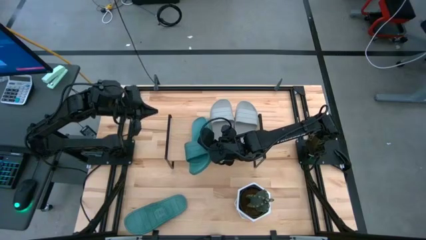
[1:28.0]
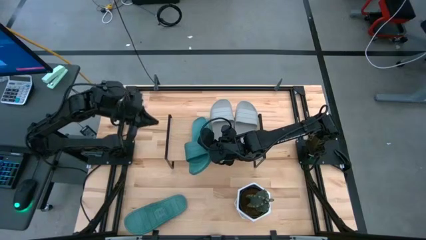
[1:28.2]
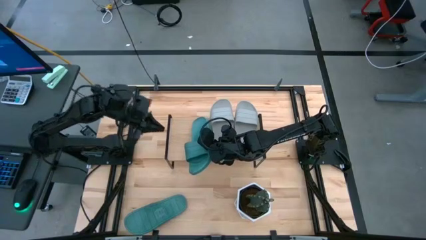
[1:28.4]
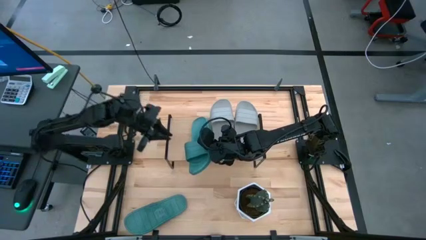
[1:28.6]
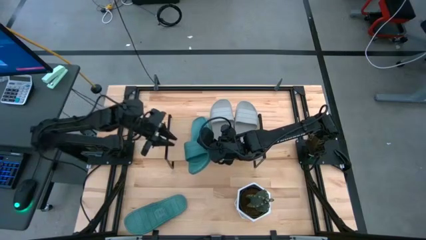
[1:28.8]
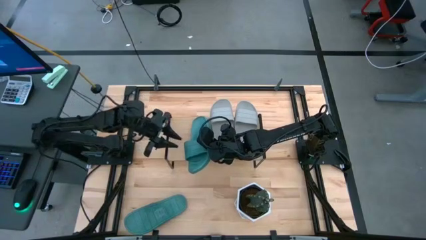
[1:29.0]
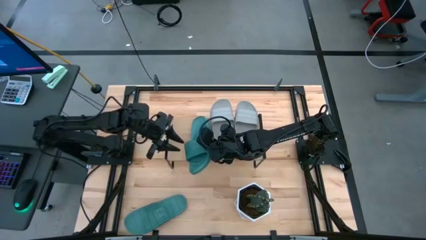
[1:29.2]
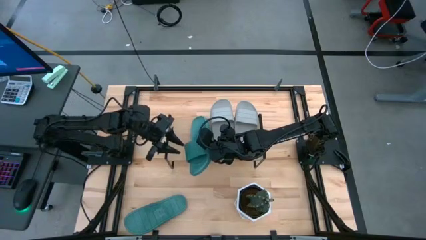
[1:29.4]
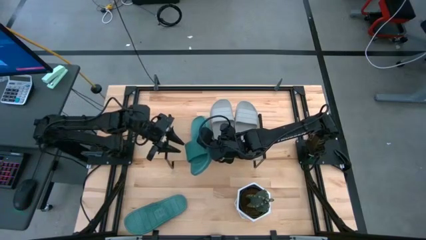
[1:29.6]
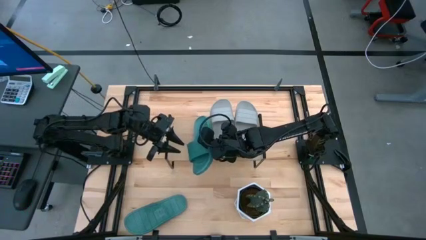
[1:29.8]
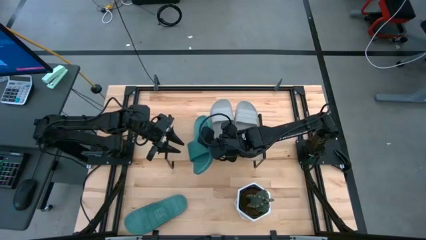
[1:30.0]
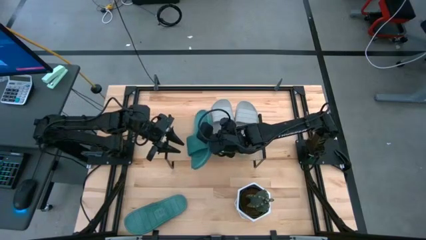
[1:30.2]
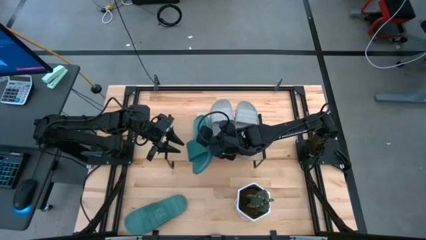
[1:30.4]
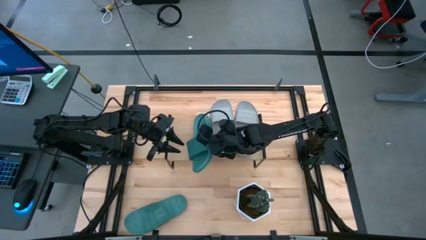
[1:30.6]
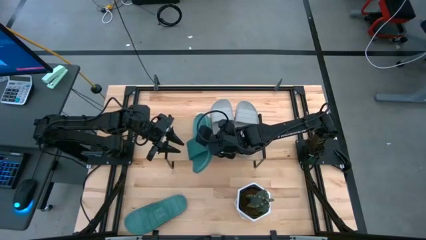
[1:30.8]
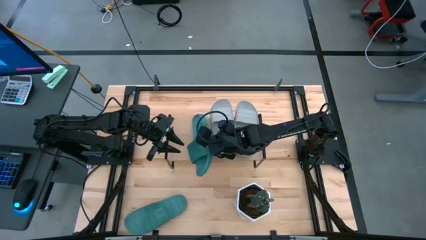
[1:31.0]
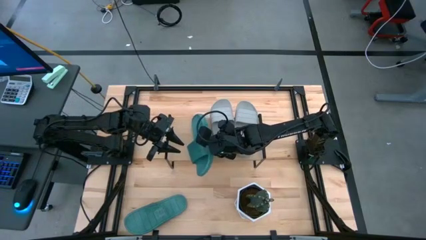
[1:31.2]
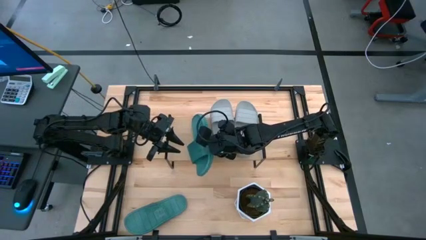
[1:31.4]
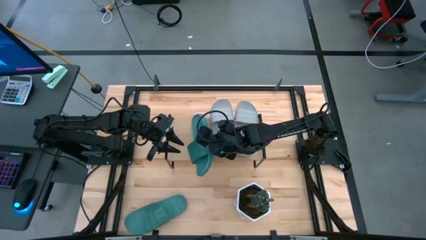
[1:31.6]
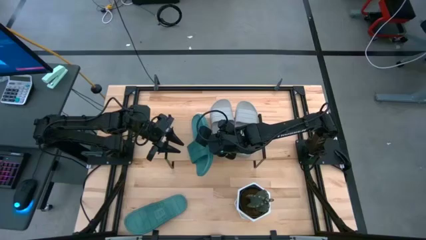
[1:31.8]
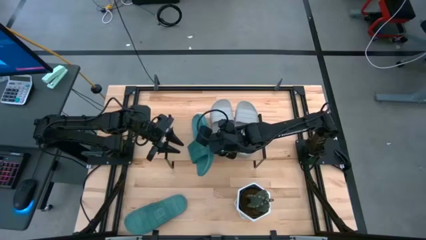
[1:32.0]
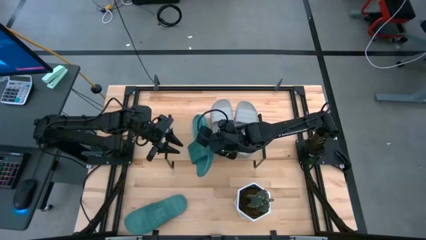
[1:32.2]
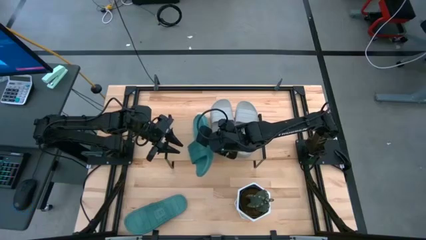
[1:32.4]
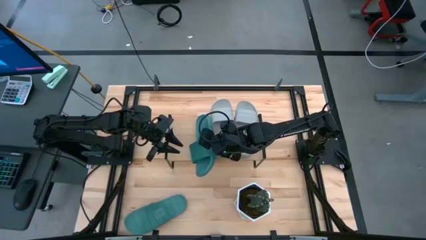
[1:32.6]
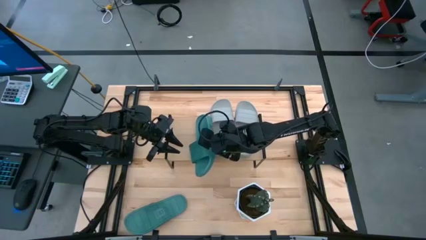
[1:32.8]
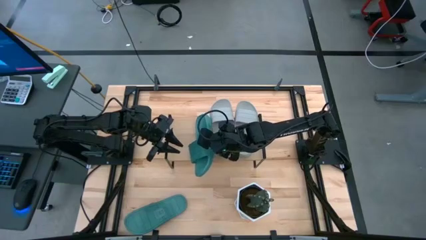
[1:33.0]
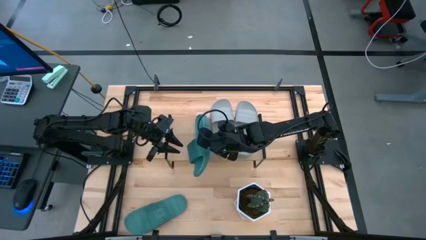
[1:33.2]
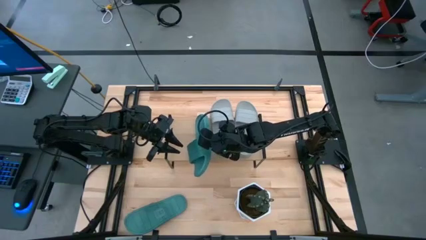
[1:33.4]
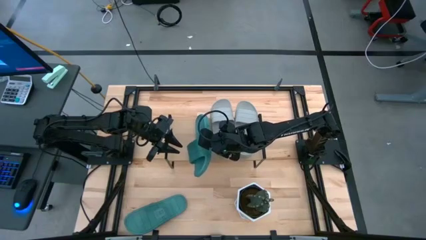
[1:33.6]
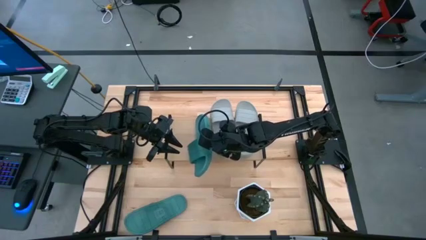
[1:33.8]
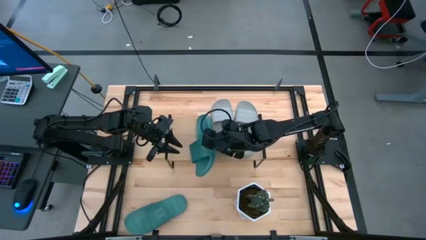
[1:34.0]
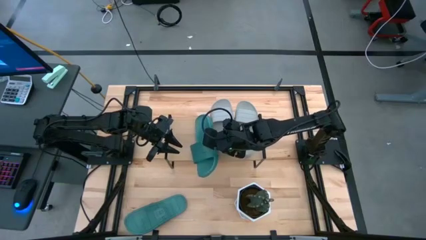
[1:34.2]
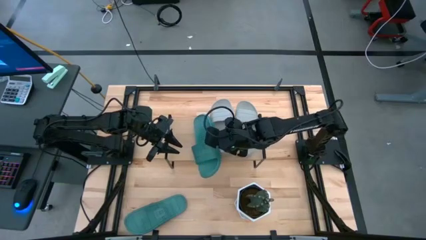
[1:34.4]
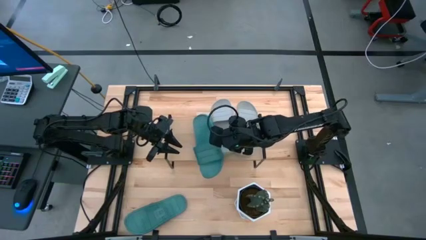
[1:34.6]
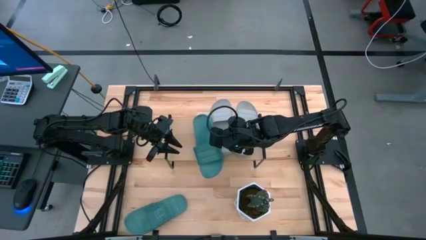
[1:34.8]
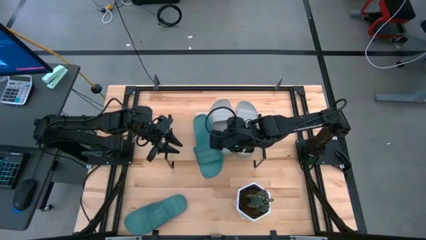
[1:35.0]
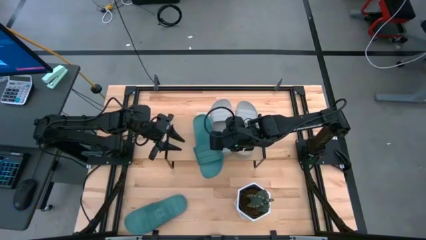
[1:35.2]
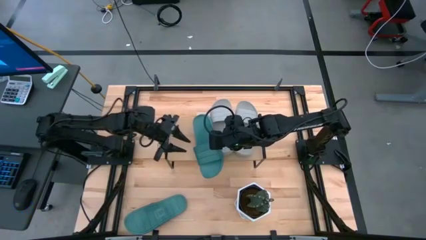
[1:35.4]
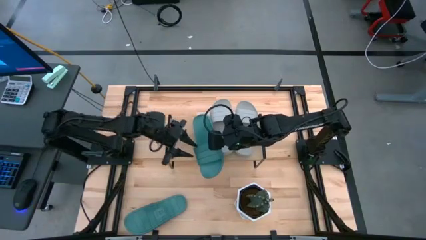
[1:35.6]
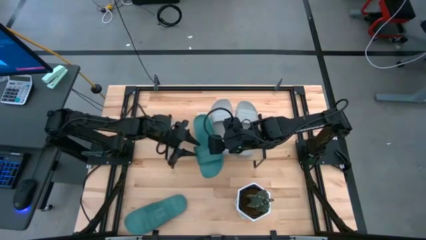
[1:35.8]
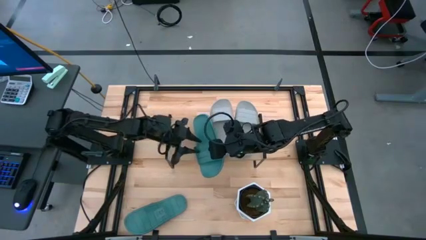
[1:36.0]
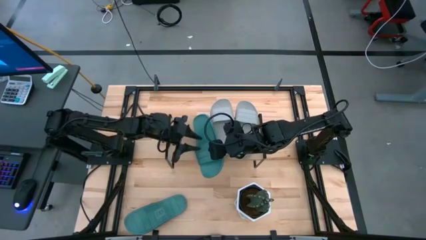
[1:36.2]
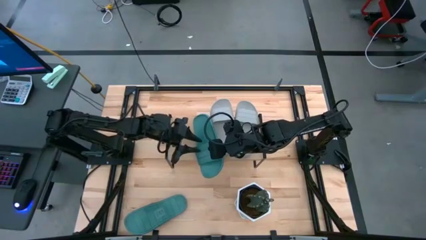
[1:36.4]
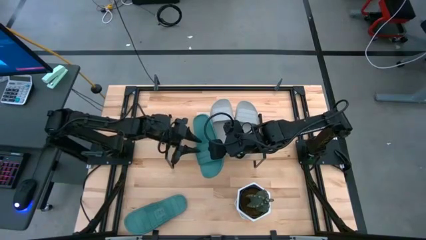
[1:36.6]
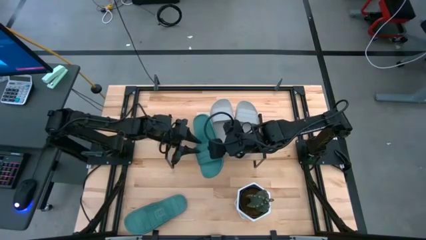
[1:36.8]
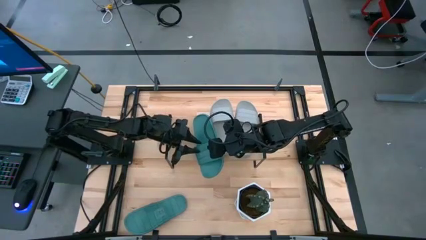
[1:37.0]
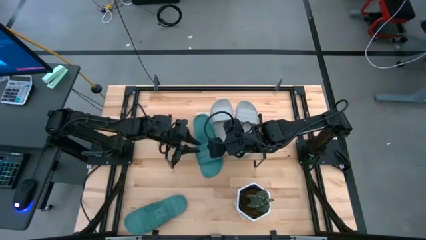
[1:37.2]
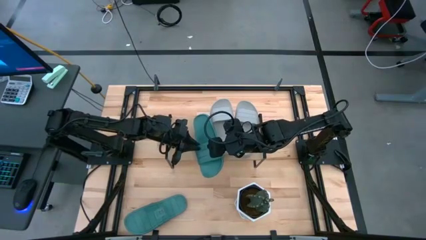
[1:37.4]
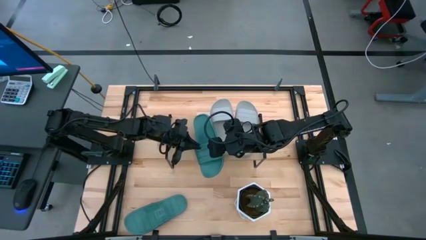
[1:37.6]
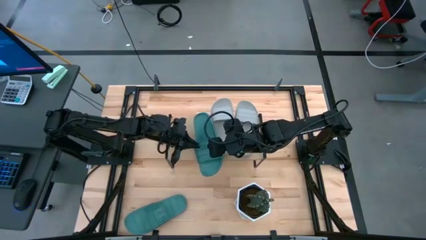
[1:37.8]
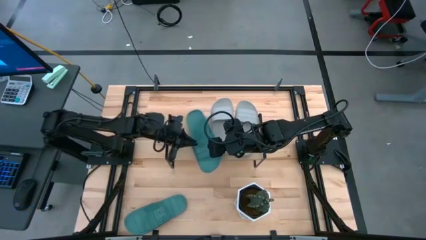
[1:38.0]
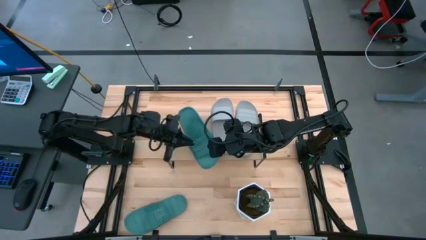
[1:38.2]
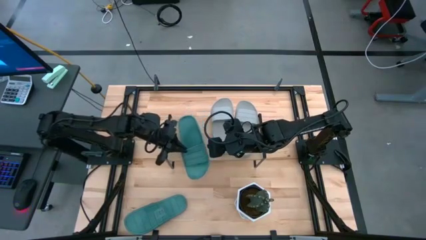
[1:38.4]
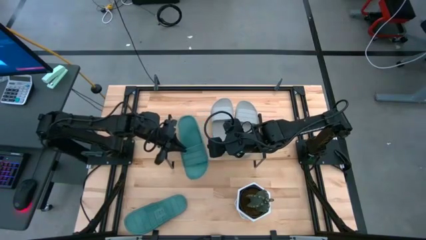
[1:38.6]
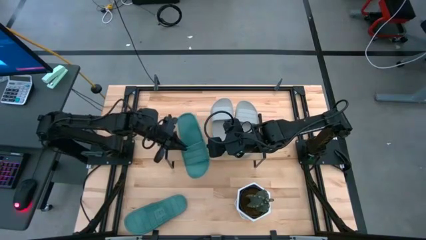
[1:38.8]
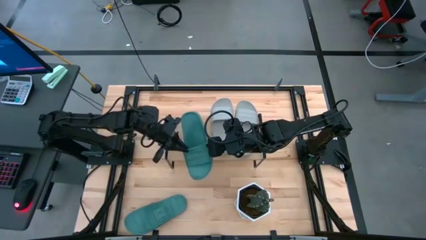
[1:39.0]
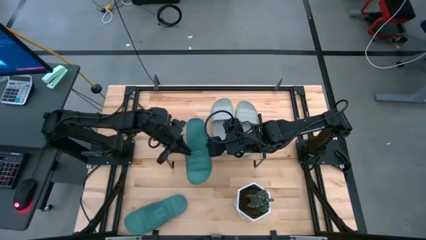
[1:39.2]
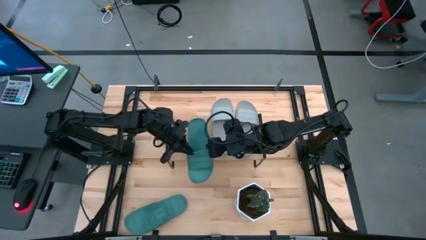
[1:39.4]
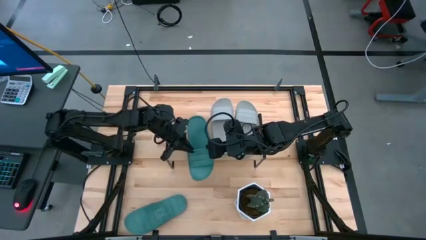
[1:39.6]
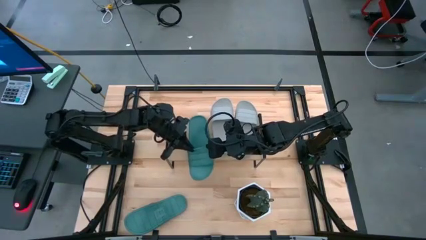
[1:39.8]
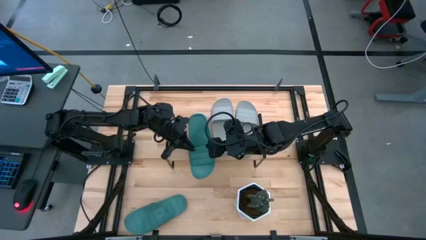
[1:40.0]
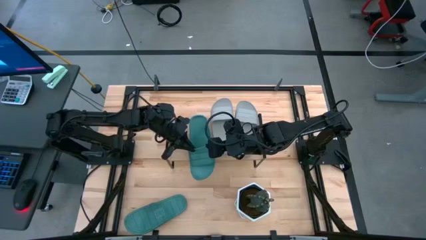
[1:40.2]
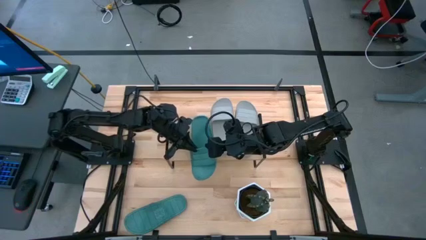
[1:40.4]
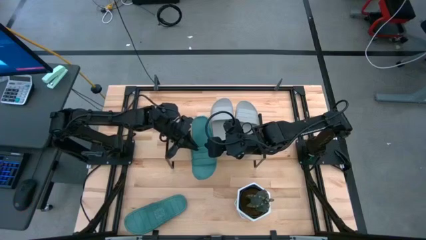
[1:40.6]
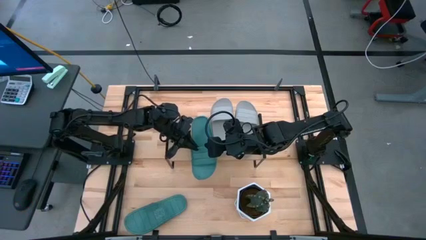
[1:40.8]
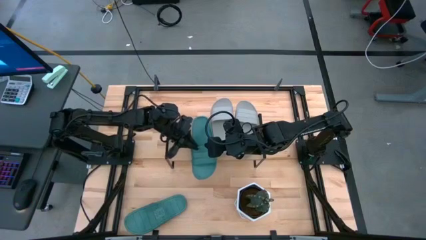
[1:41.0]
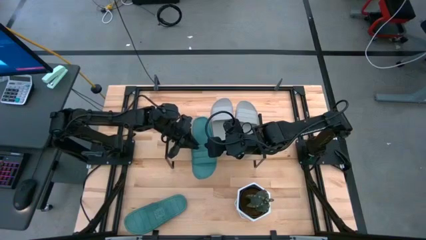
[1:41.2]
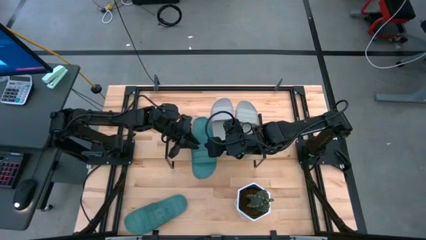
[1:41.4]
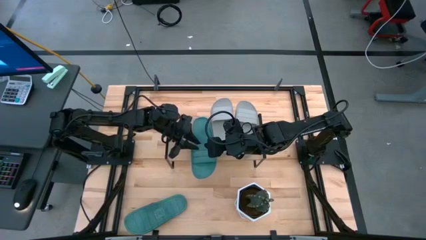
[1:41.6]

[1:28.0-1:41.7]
Task: Pick and place slides into the shelf
Put the top green slide on the shelf
